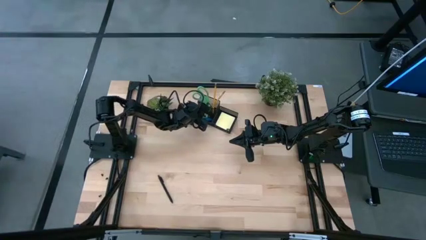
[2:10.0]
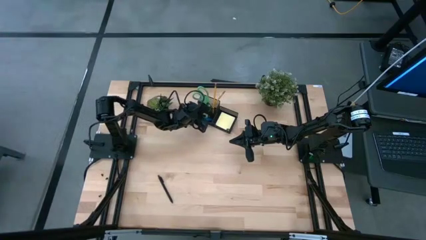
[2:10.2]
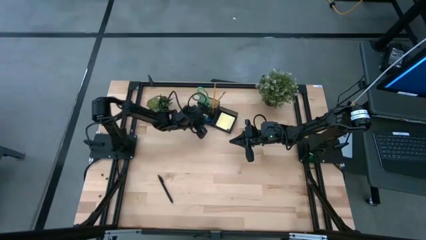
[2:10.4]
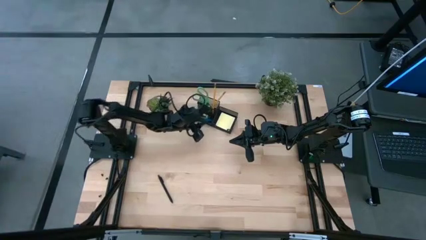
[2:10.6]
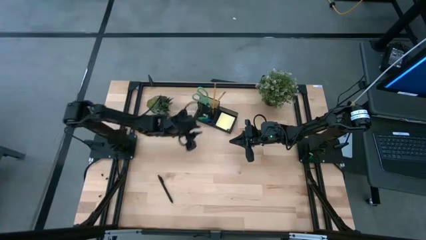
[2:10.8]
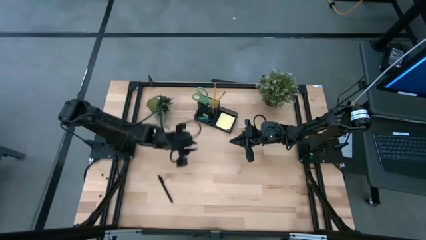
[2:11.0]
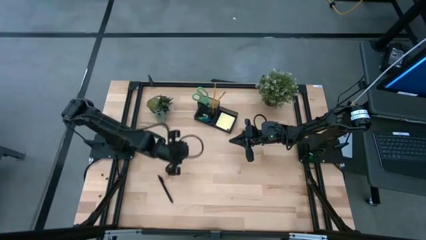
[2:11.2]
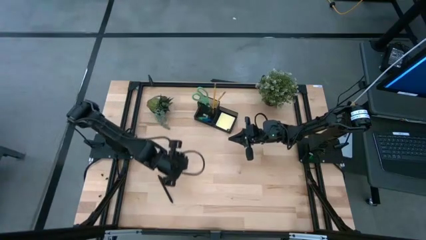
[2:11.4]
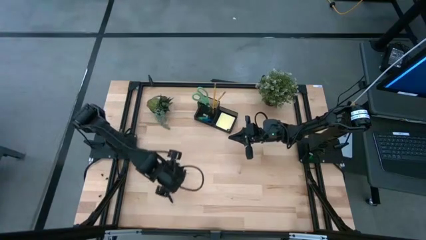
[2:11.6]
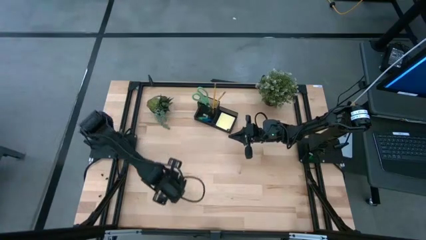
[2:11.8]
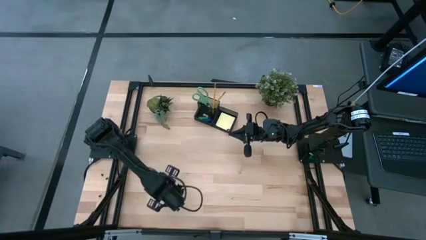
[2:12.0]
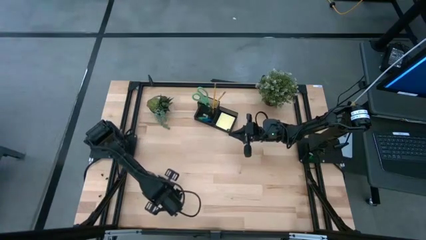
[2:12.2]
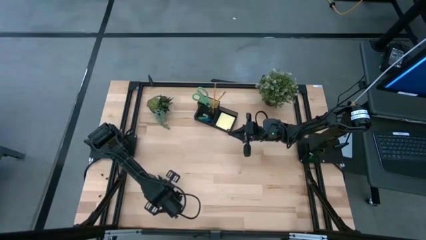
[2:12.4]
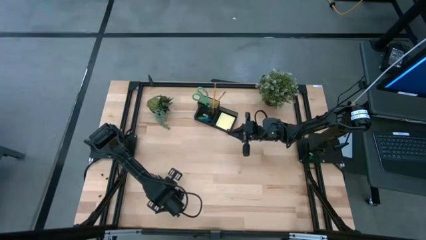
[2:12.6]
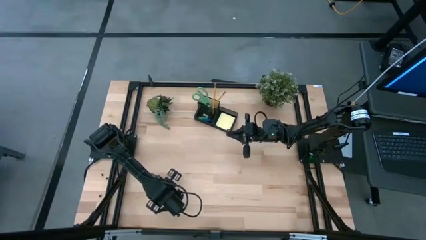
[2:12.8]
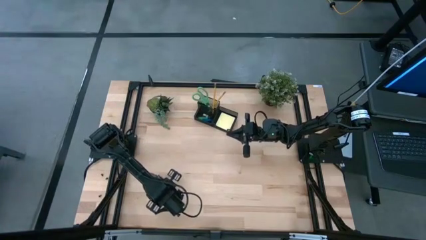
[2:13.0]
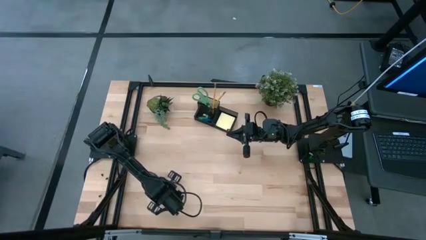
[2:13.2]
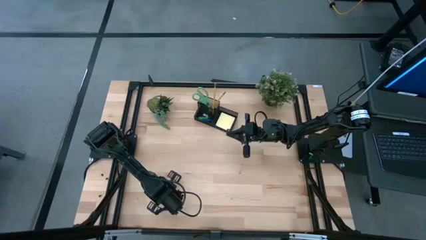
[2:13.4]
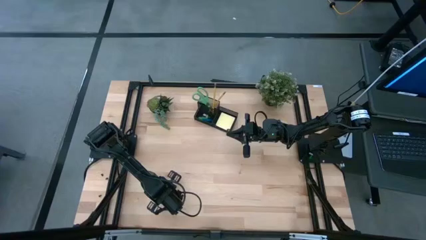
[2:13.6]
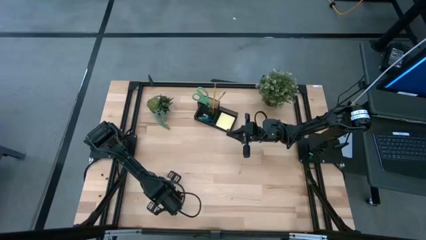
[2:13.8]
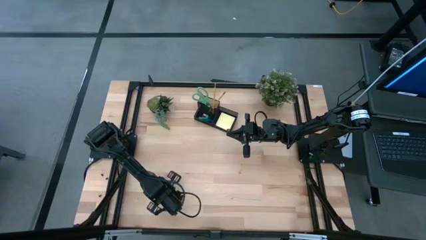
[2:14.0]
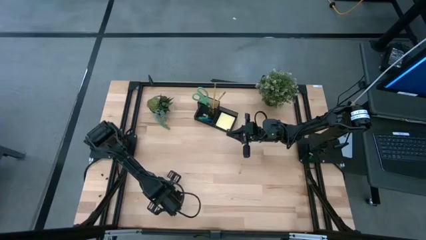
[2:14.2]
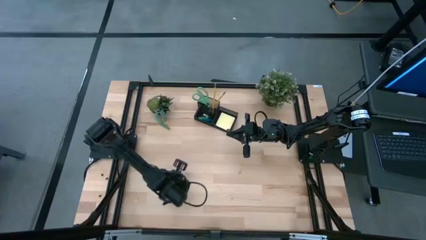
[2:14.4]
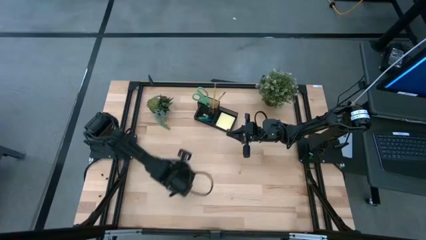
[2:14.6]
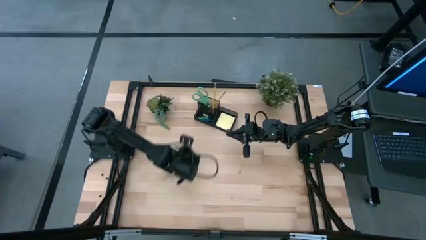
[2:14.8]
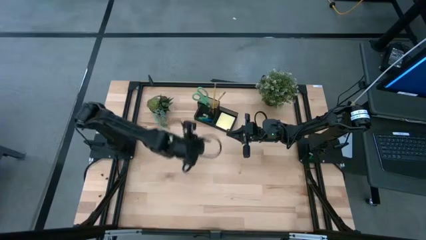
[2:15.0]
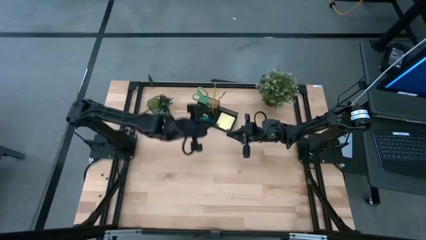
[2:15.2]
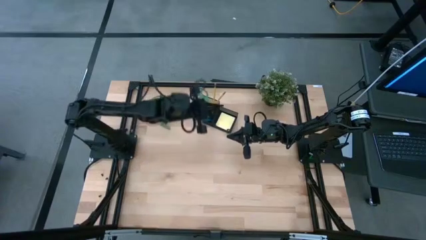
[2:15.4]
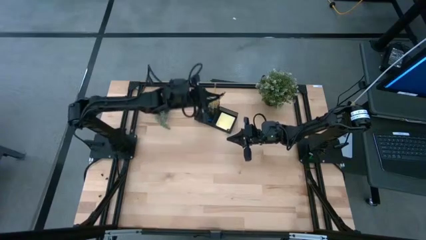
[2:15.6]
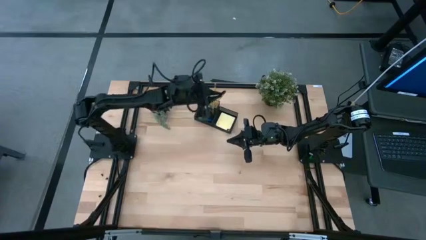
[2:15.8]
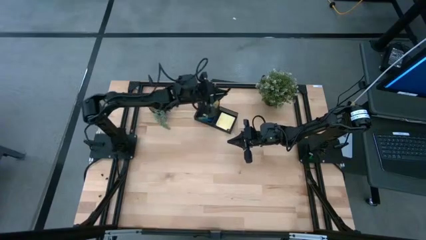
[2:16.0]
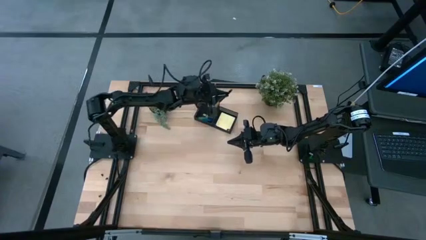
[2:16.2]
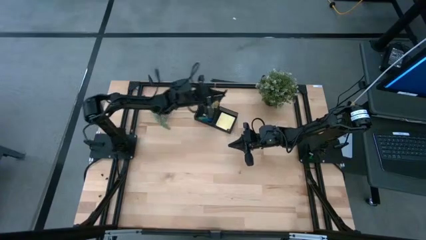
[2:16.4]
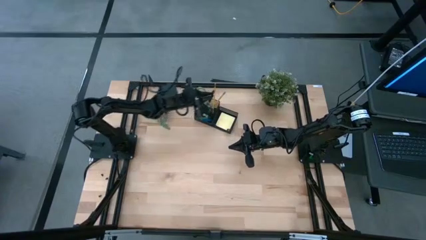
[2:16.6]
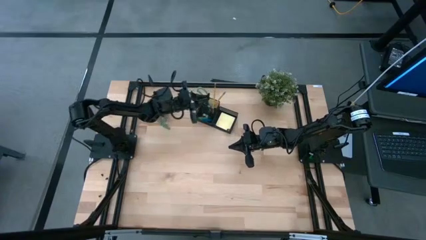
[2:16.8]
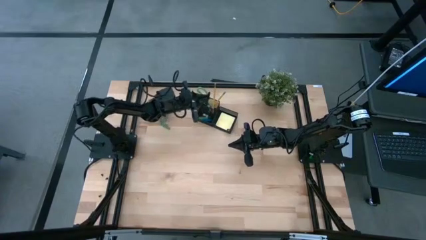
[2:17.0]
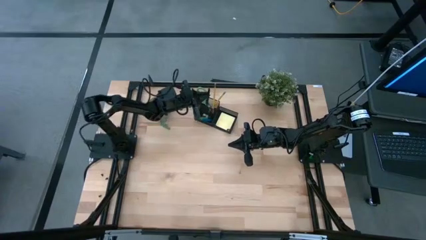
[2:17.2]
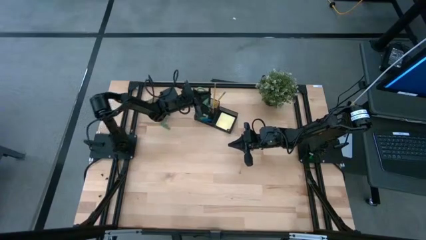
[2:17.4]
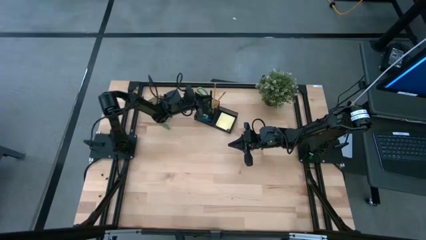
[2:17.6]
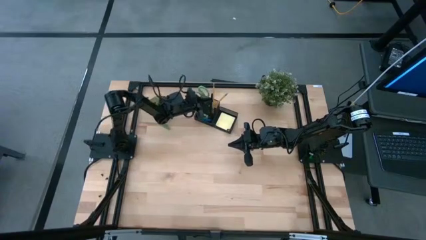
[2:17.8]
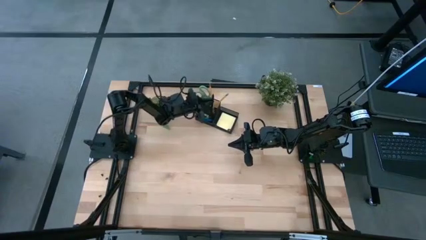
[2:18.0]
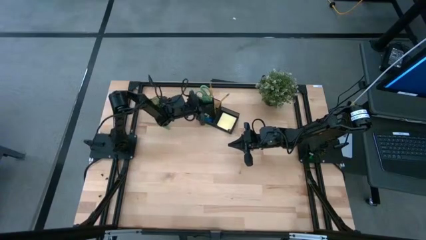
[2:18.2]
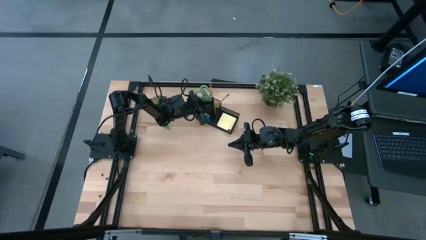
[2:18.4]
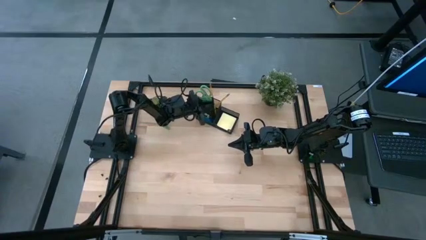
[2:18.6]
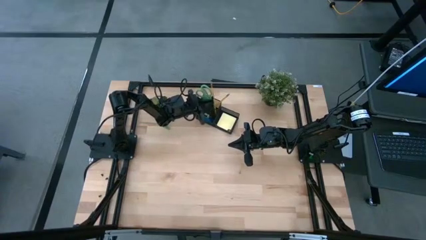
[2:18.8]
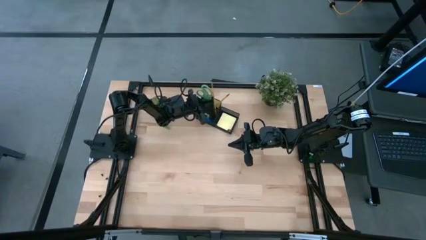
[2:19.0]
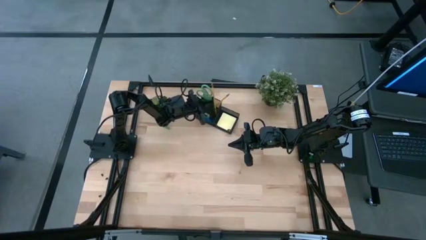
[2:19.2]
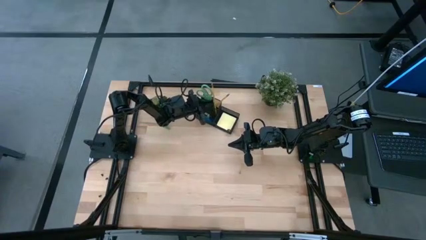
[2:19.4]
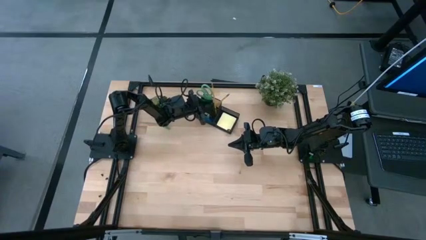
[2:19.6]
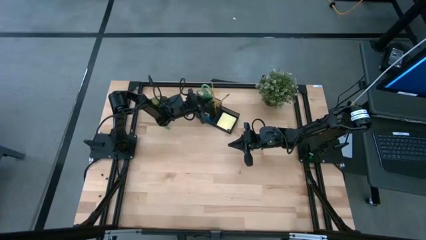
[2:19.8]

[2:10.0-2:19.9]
Task: Pick and place office supplies into organizer
Put the pen into the desk organizer

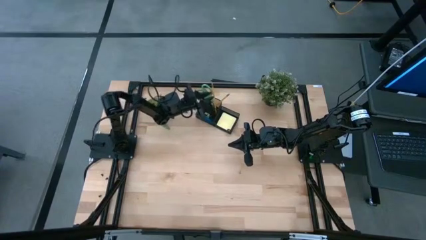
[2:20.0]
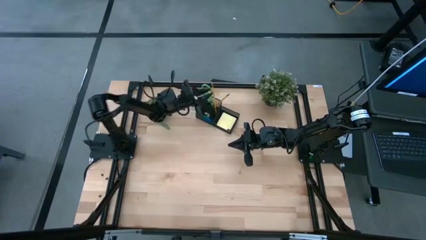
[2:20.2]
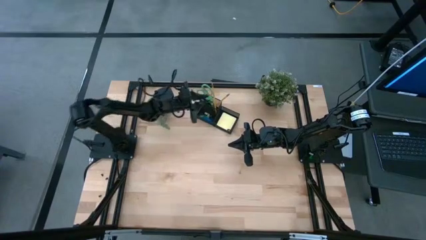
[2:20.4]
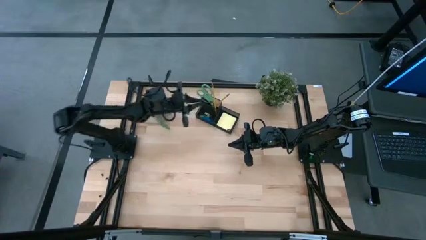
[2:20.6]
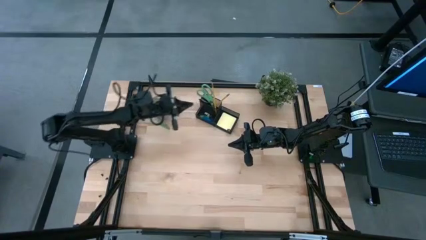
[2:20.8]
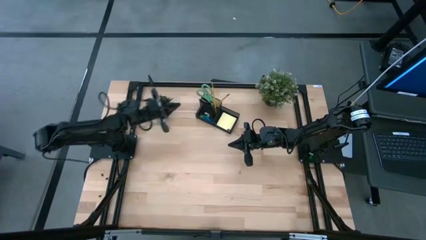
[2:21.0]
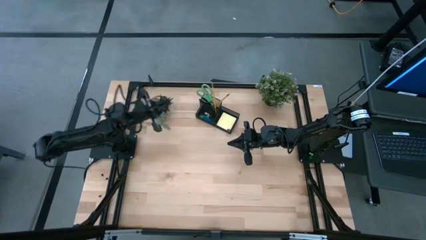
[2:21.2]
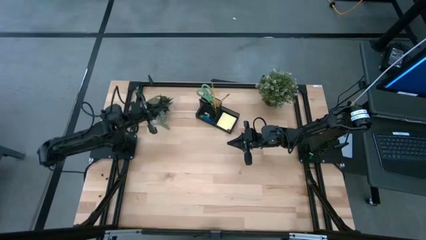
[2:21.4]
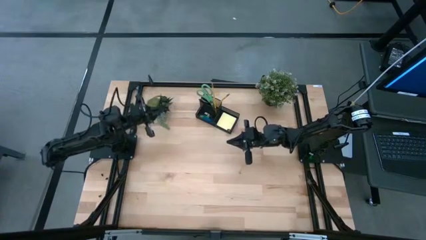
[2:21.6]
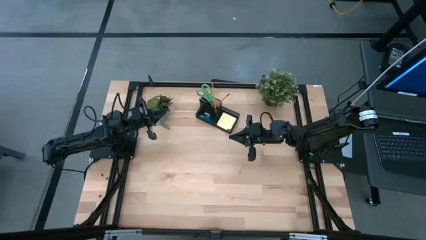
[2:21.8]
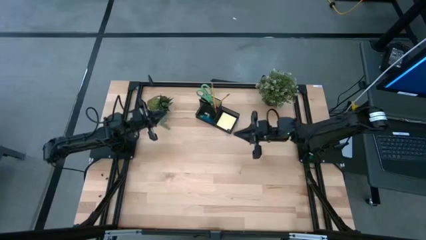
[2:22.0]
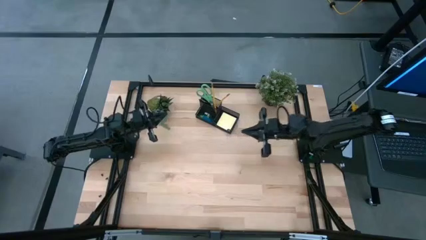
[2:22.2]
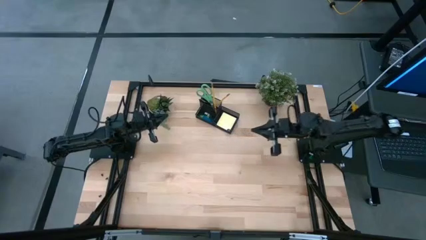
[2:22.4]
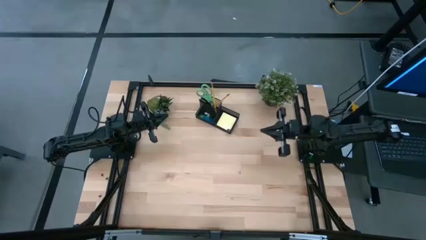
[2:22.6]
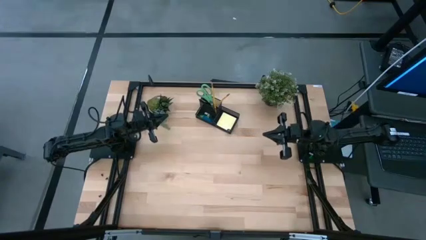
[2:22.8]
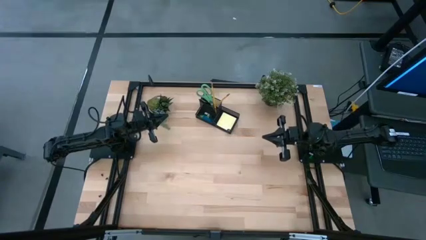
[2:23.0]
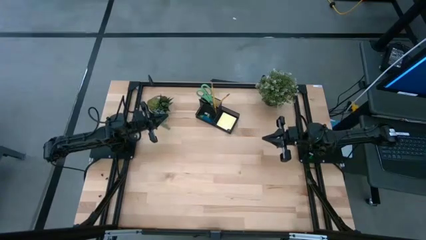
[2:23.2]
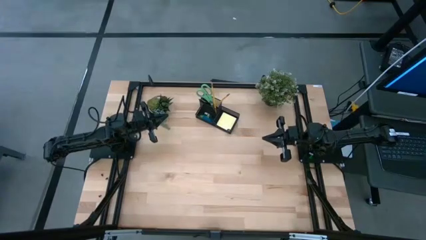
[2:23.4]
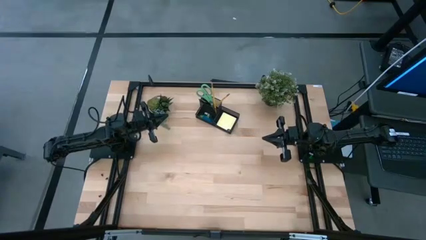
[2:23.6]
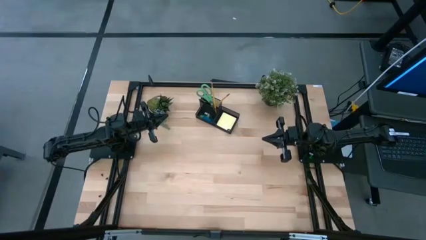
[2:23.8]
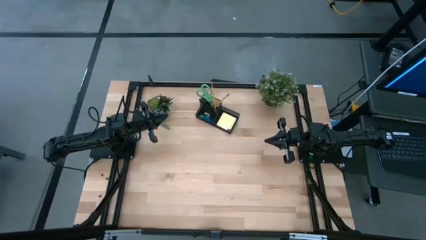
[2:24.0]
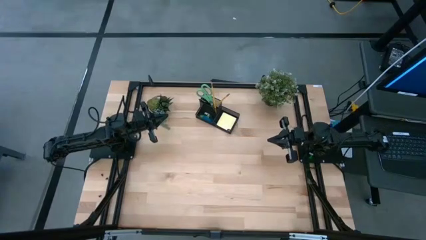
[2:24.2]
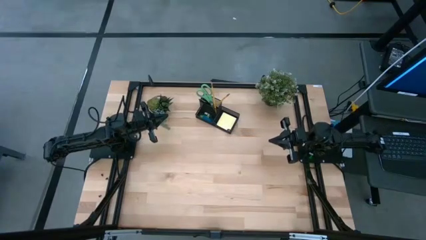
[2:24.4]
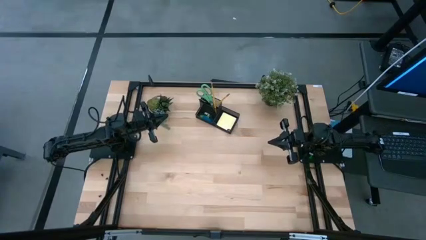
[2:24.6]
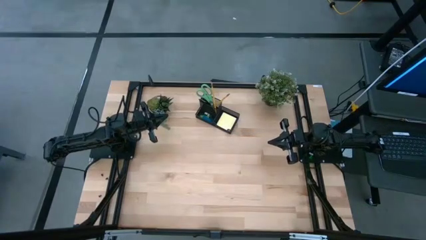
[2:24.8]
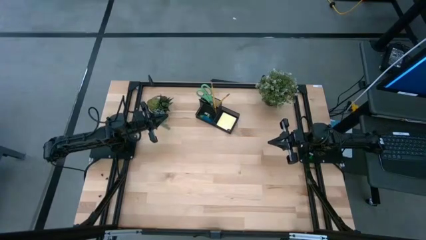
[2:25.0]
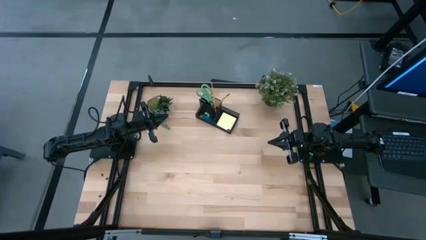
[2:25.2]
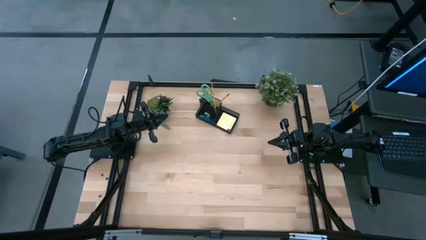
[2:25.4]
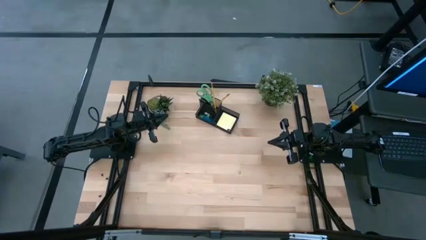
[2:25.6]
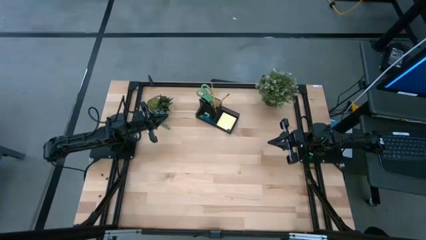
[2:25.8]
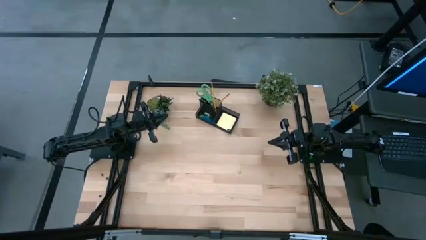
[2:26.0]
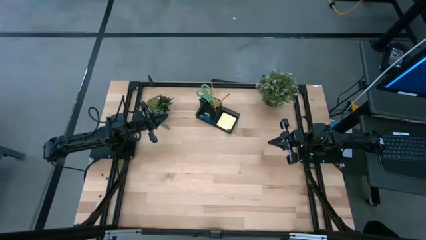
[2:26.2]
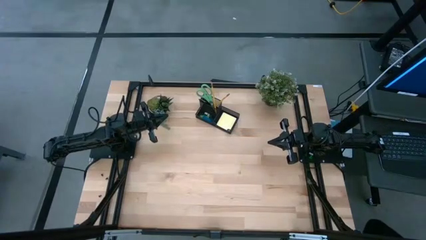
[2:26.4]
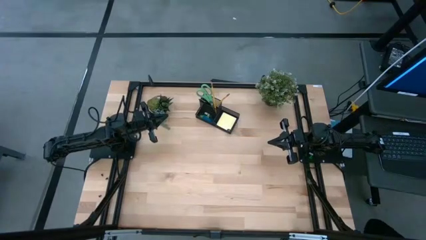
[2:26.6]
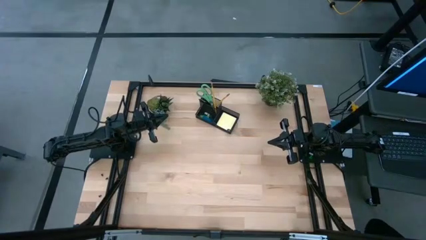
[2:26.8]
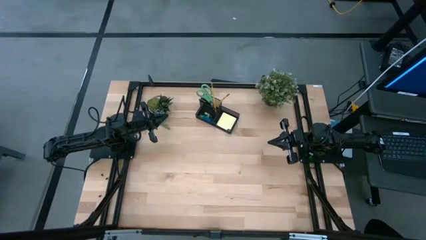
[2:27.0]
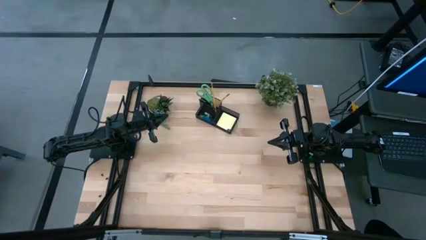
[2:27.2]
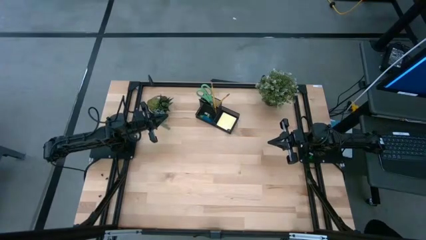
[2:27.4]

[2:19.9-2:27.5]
Return to Home Position
